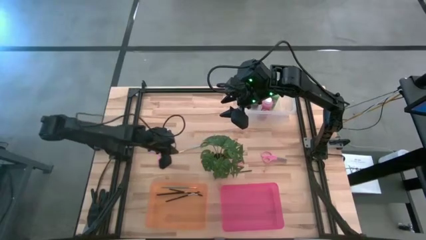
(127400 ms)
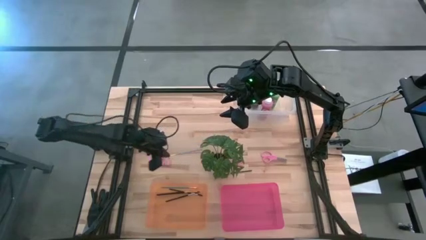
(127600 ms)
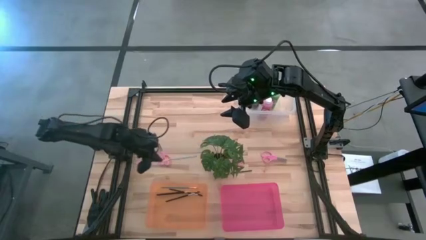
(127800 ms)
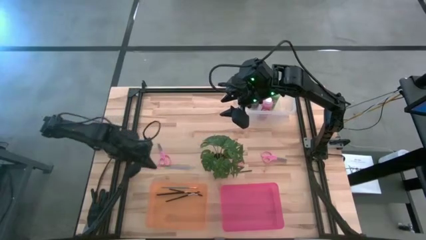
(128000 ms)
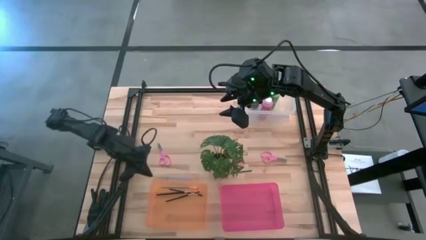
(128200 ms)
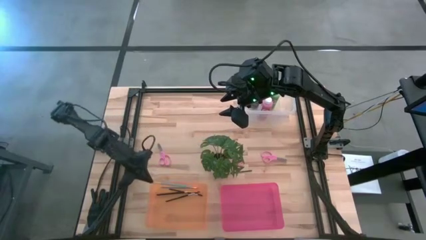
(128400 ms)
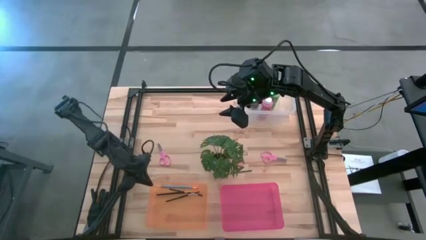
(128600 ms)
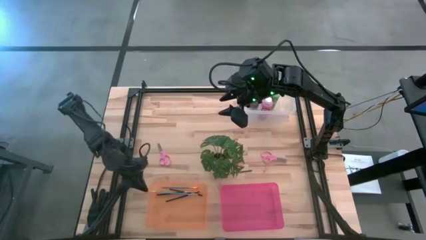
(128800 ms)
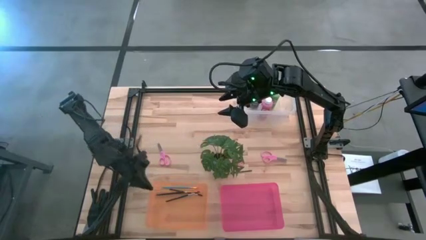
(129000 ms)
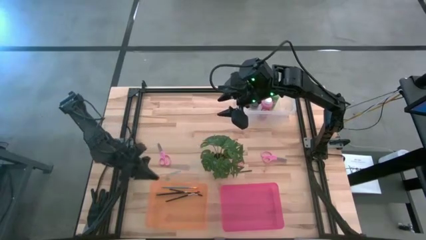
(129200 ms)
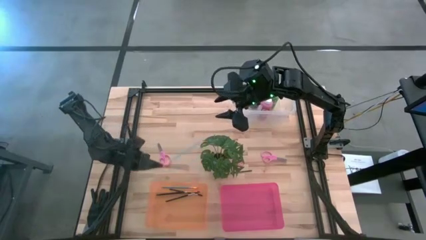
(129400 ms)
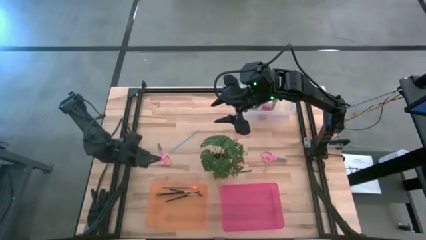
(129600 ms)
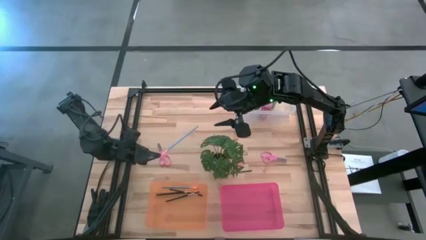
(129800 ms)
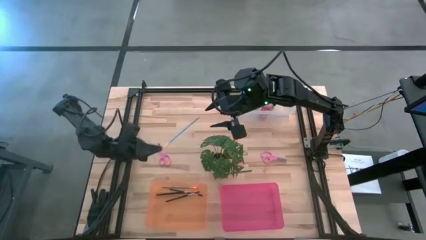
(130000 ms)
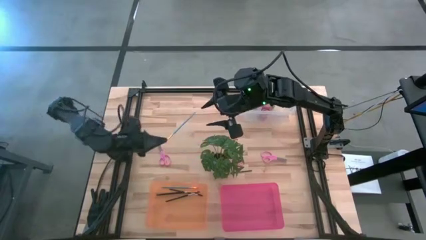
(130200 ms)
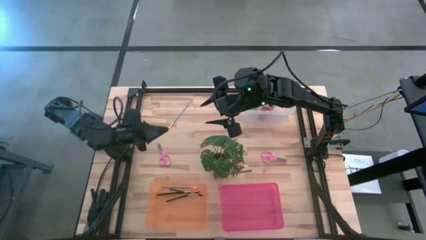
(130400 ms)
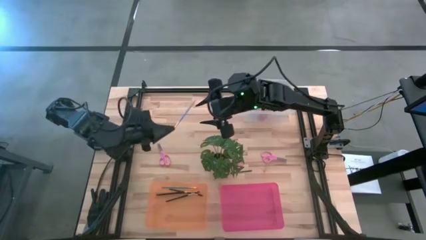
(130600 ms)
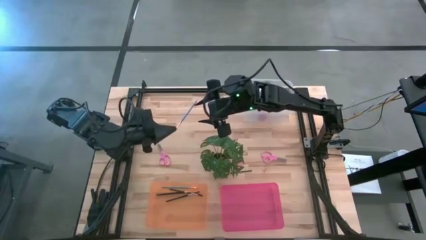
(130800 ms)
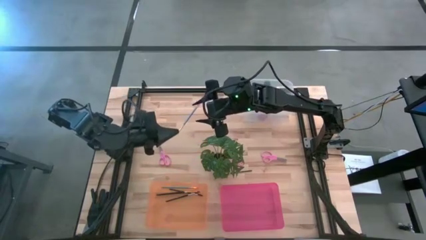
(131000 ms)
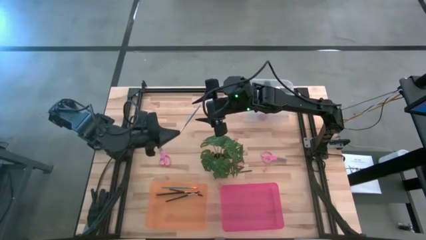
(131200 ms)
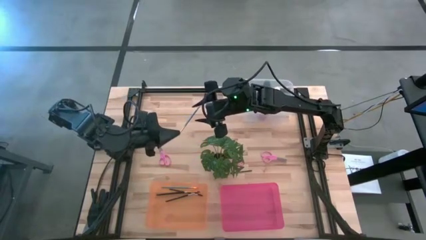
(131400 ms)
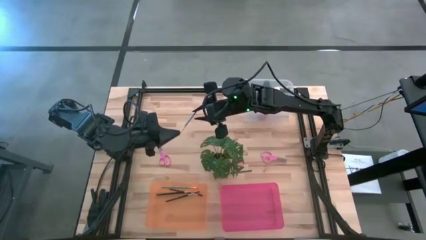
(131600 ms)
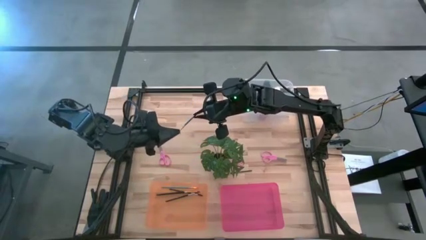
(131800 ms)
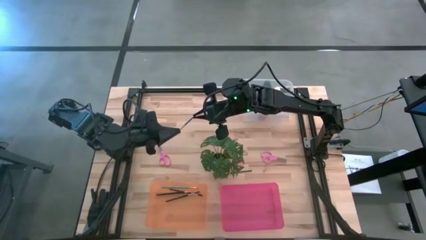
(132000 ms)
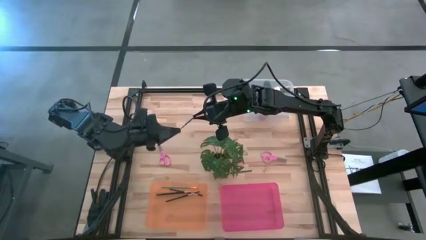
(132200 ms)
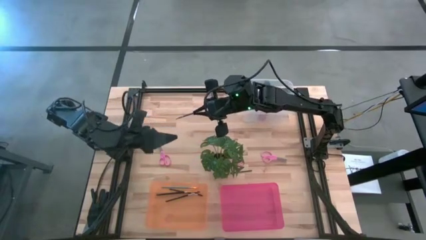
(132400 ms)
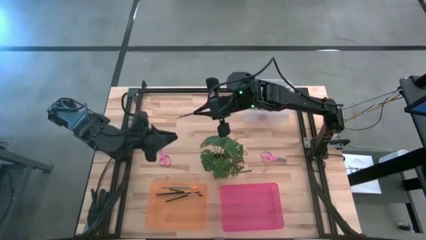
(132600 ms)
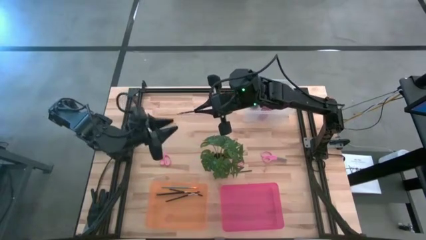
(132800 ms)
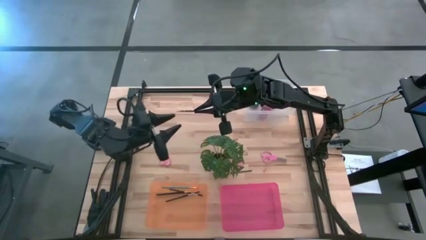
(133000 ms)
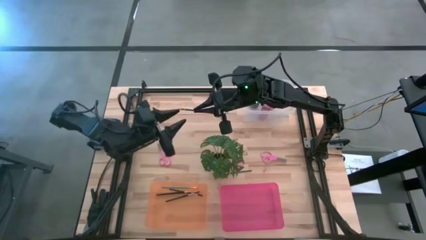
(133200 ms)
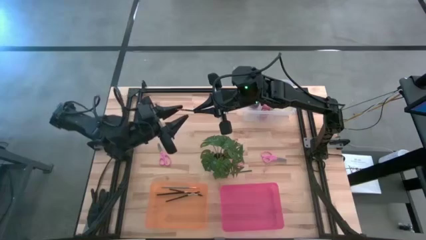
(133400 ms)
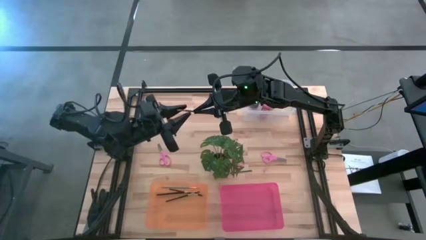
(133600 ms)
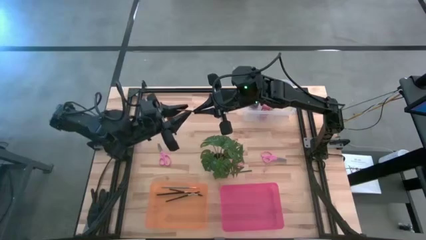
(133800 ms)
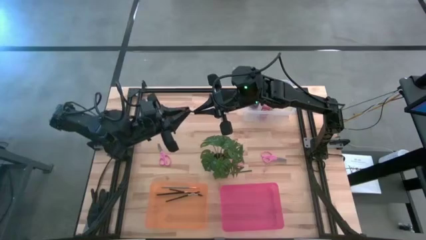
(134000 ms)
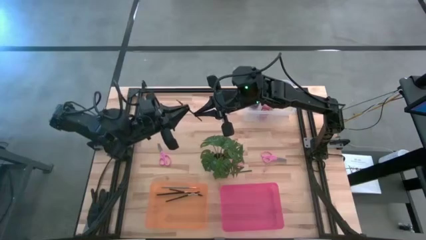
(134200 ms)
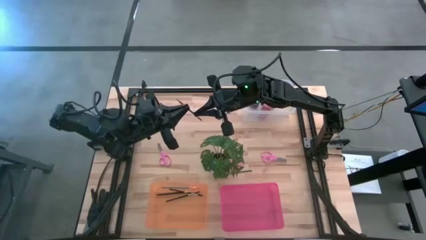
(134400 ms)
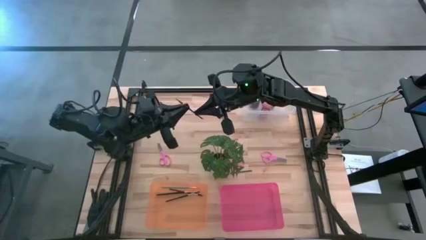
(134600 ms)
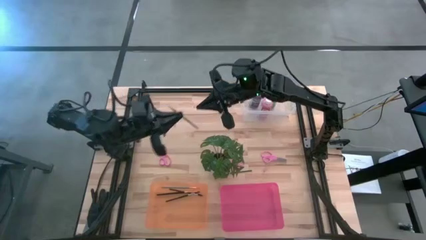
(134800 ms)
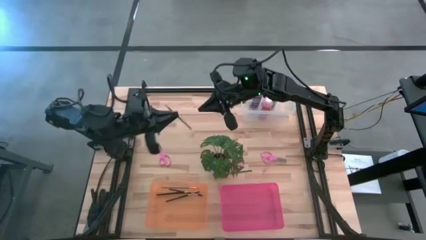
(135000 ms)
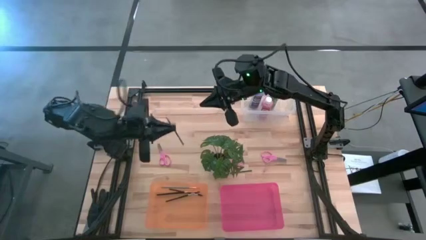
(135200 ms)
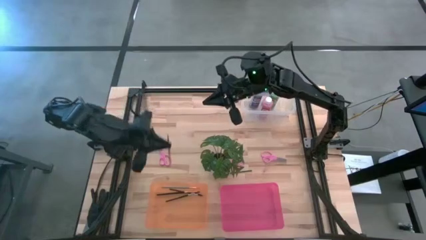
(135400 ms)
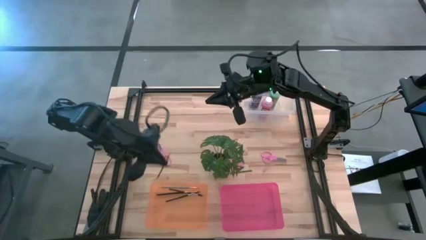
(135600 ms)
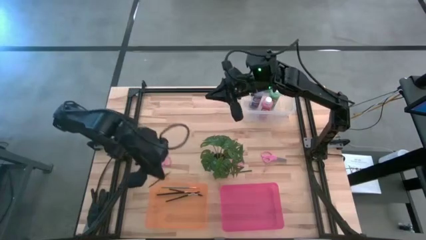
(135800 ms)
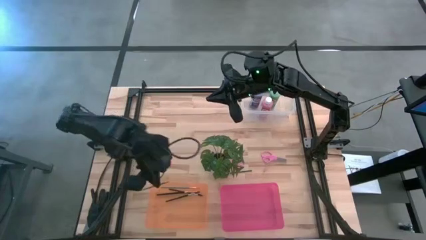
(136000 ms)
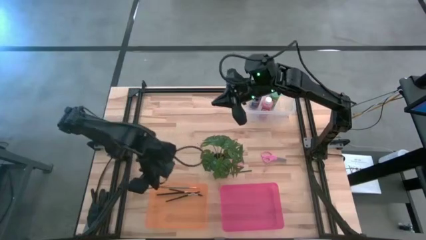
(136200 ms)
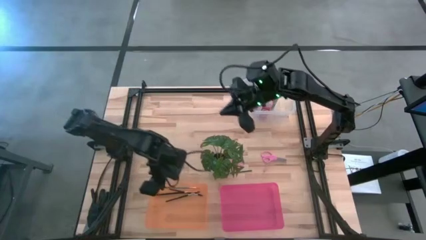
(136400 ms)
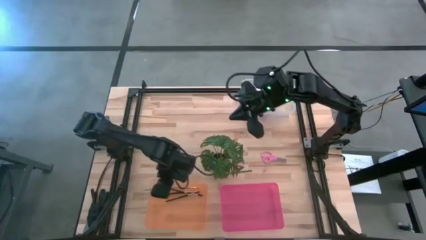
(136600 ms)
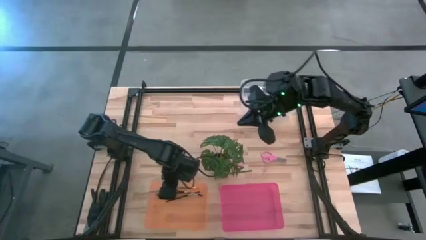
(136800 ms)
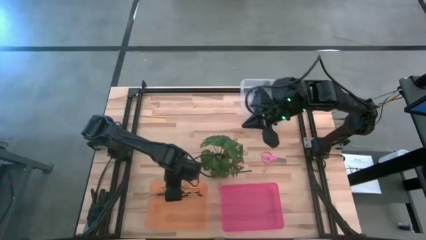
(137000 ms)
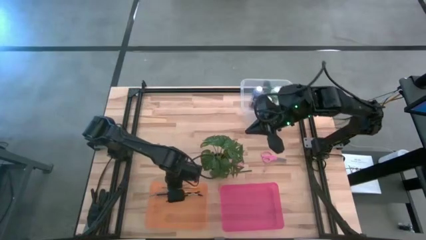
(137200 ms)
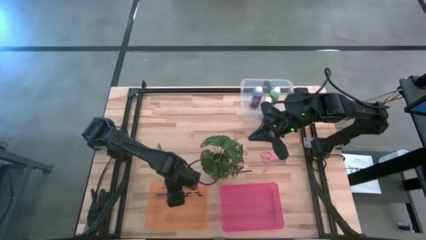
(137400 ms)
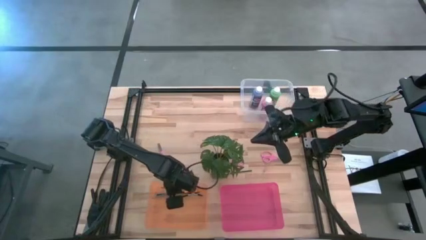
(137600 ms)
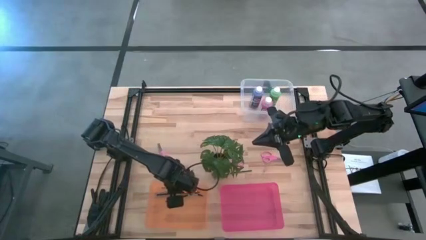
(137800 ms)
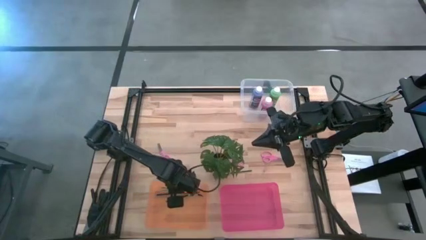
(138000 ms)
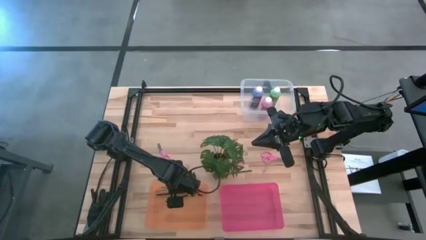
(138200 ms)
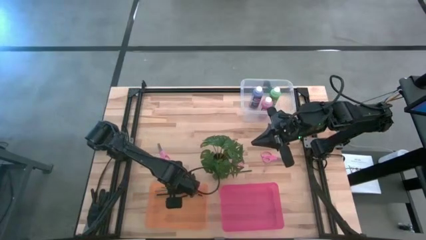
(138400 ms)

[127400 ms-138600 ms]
Task: Pick & Place Paint Supplies
Put the blue paint brush into the orange bin
